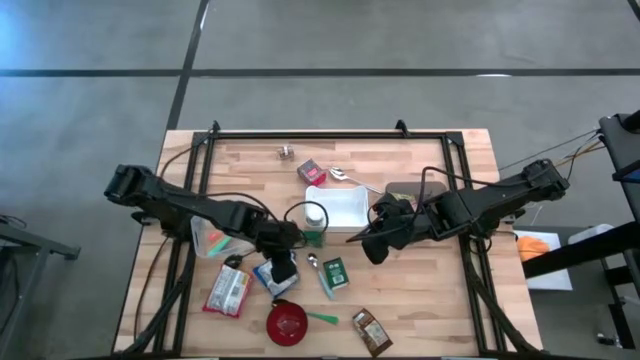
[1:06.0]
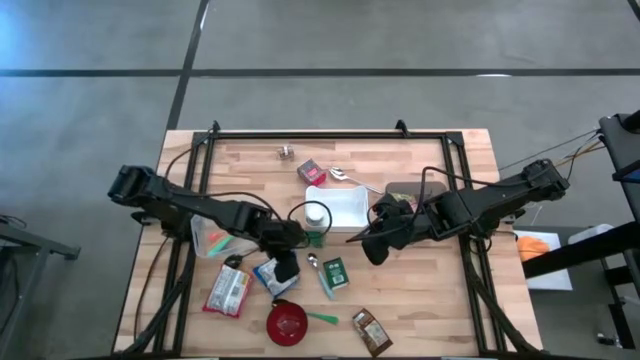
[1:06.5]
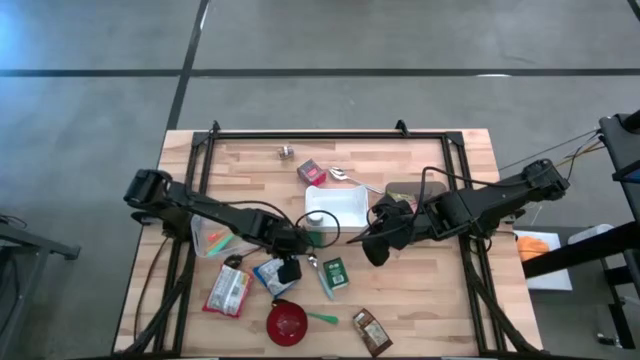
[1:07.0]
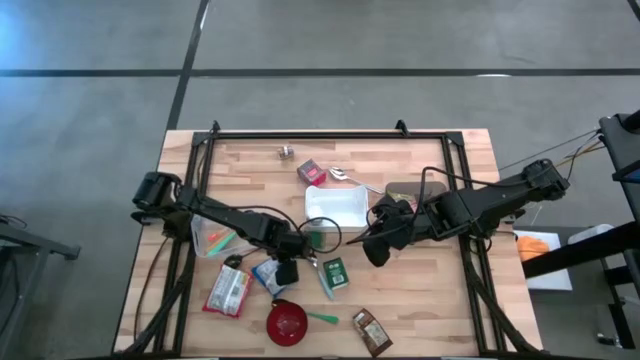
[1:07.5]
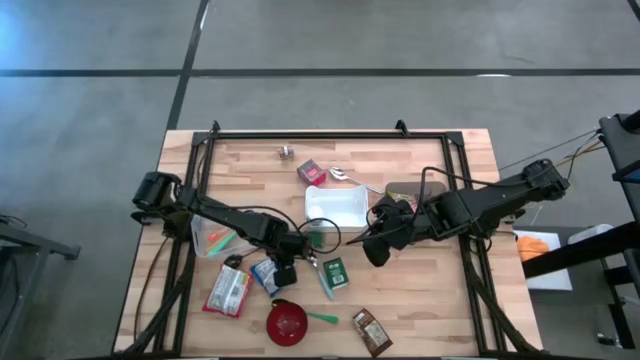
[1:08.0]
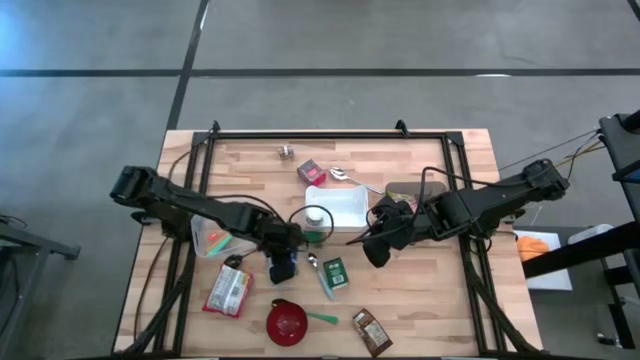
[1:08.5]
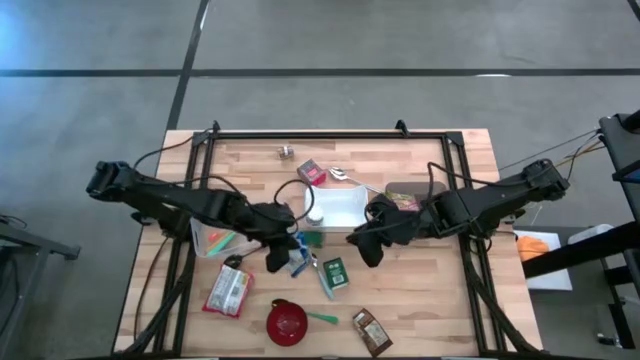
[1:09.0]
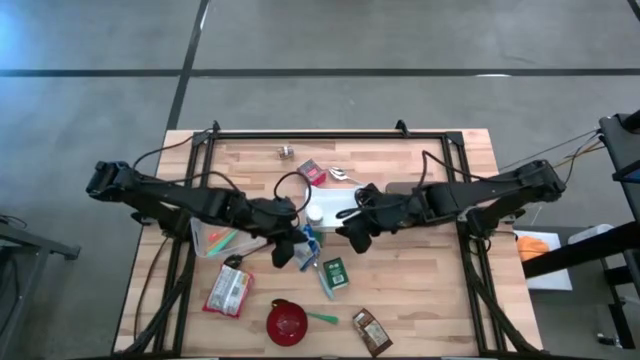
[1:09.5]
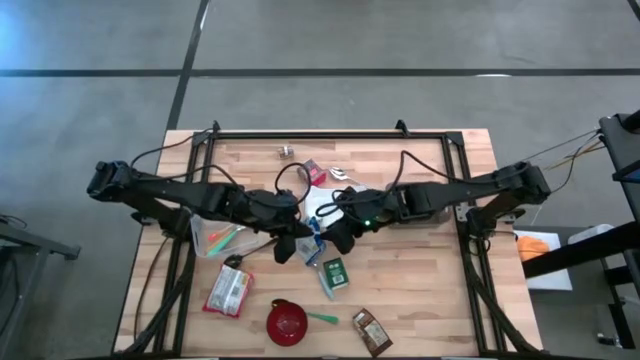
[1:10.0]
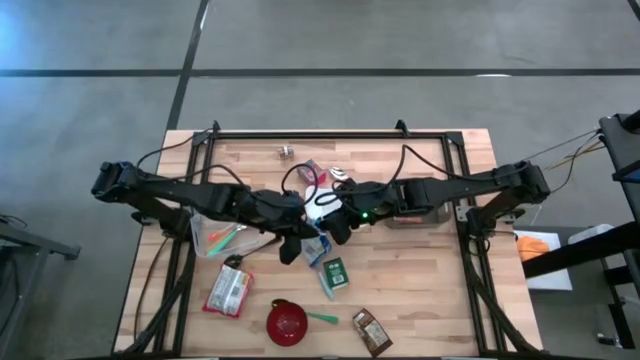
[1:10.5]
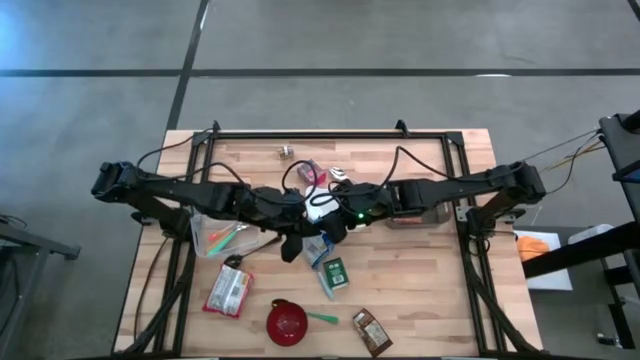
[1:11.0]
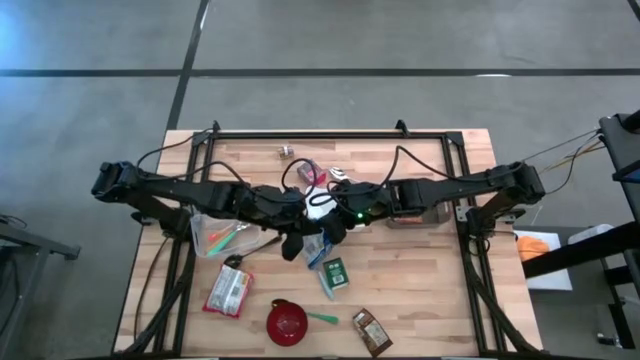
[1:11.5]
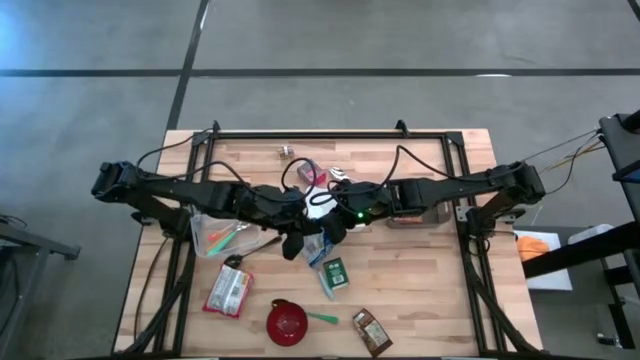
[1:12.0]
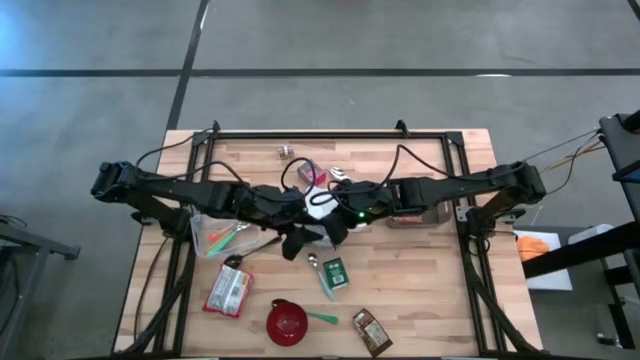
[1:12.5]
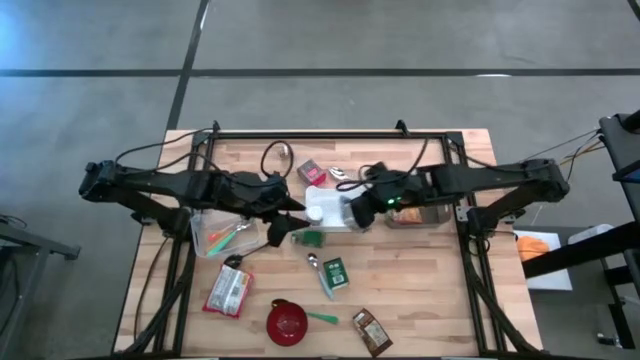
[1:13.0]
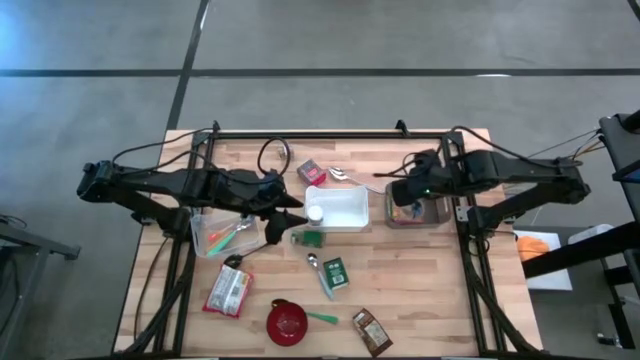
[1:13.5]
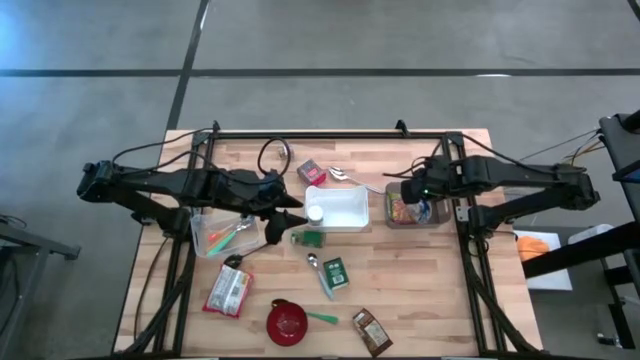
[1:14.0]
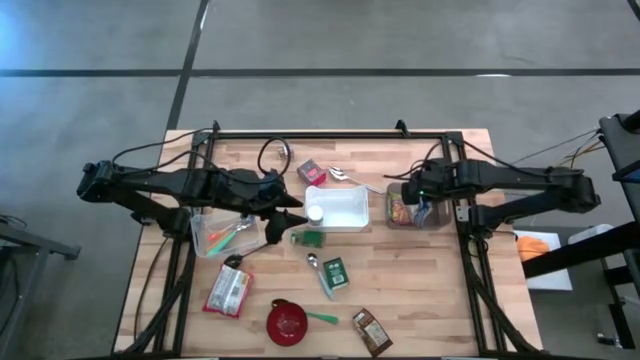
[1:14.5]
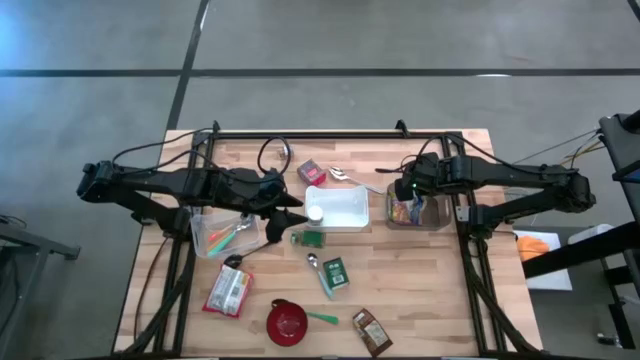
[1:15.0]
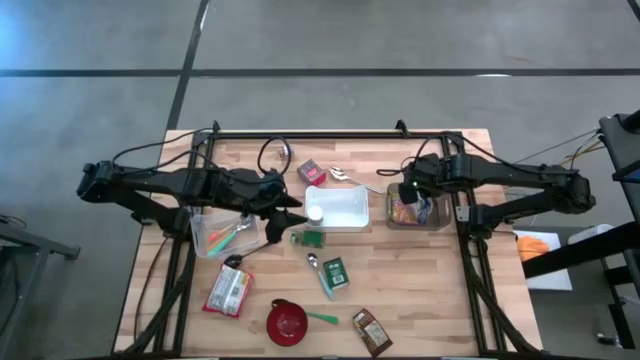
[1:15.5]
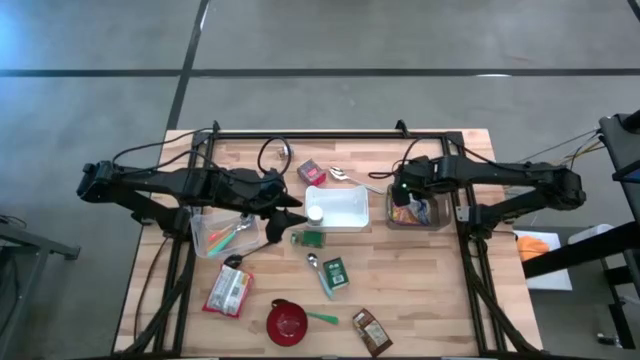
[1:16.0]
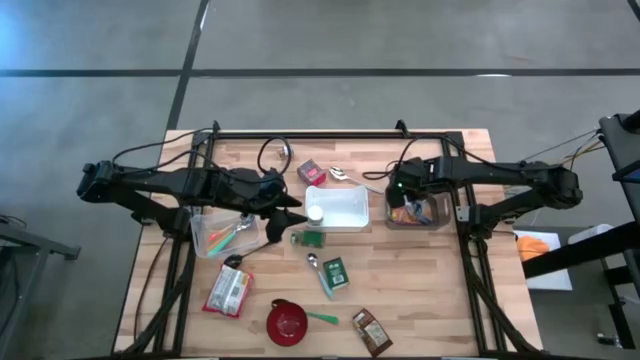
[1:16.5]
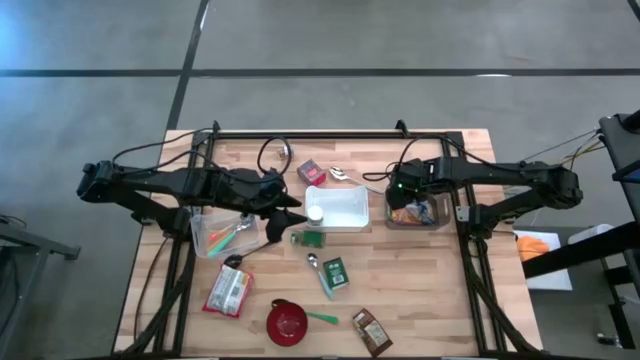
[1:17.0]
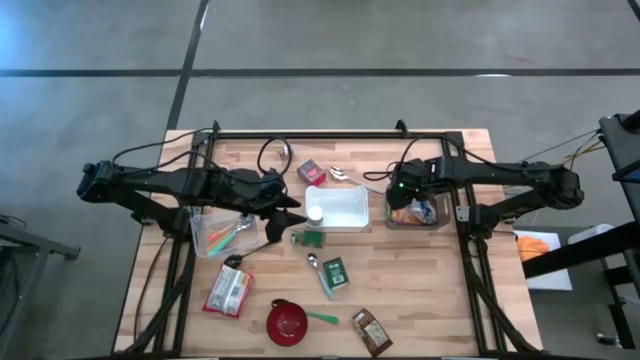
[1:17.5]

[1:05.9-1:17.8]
Put the blue noodle pack into the black bin
